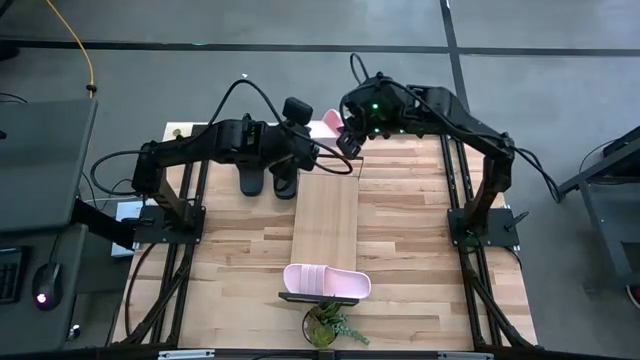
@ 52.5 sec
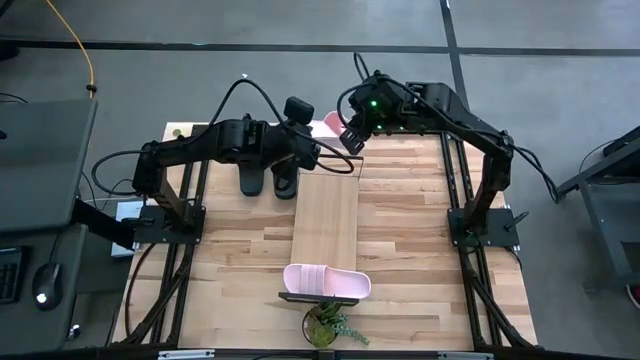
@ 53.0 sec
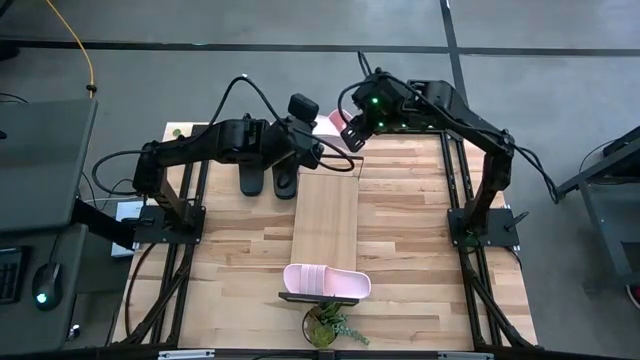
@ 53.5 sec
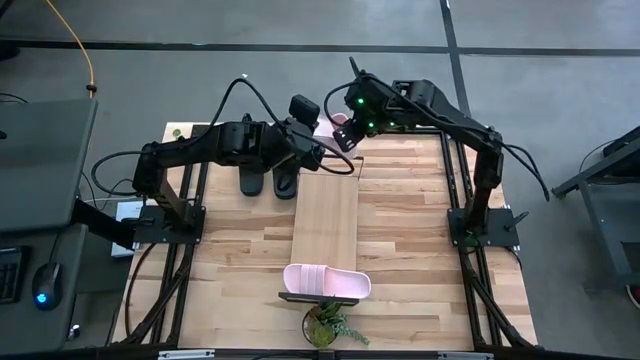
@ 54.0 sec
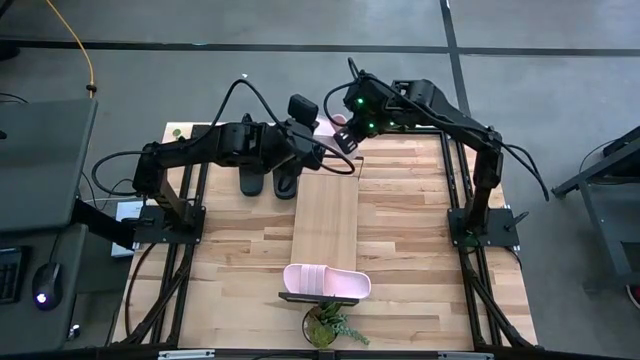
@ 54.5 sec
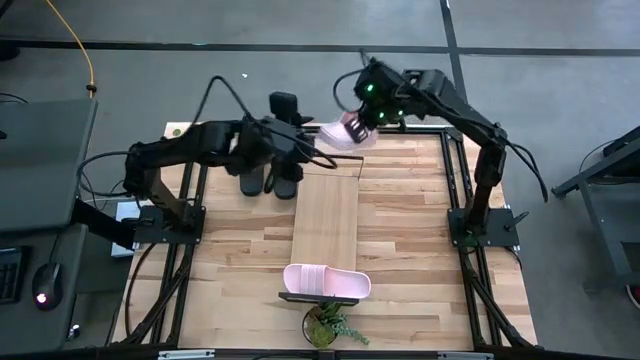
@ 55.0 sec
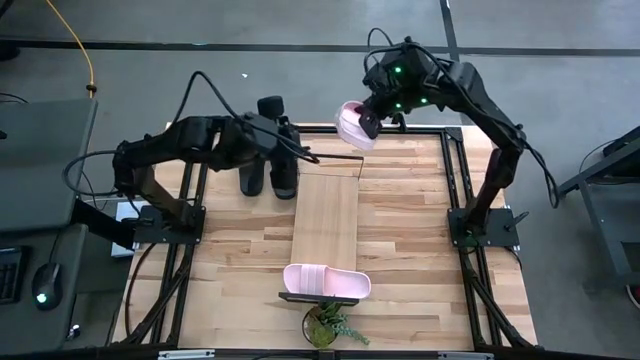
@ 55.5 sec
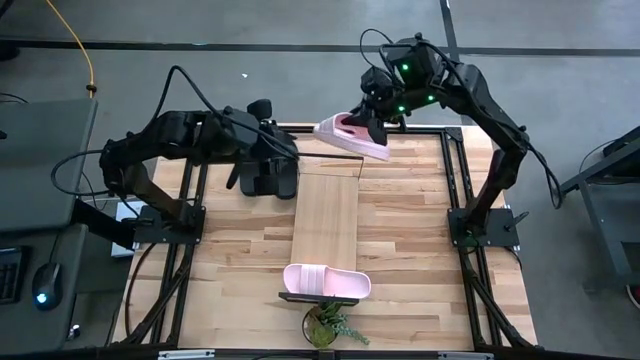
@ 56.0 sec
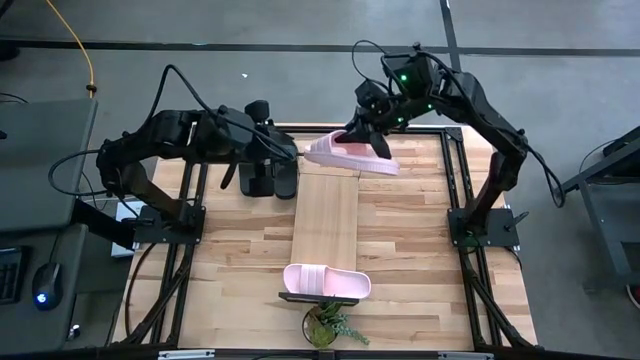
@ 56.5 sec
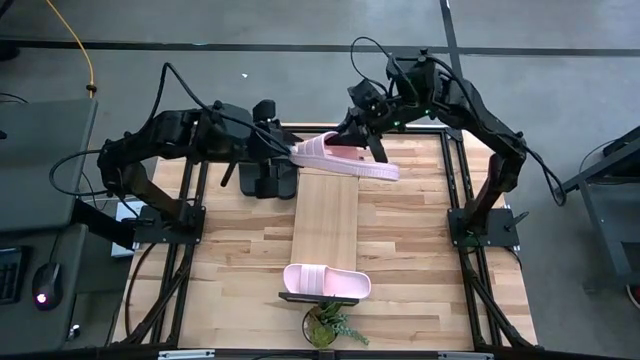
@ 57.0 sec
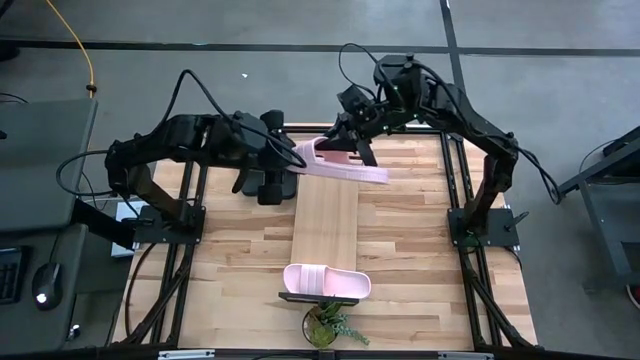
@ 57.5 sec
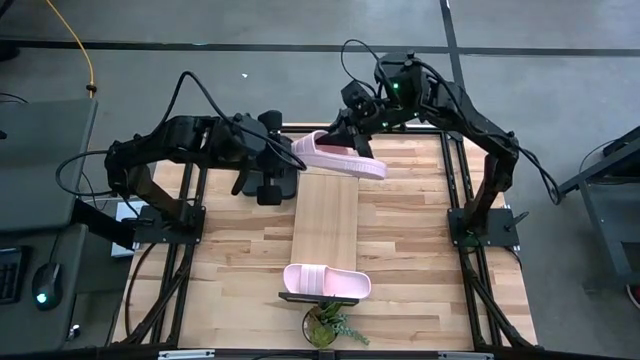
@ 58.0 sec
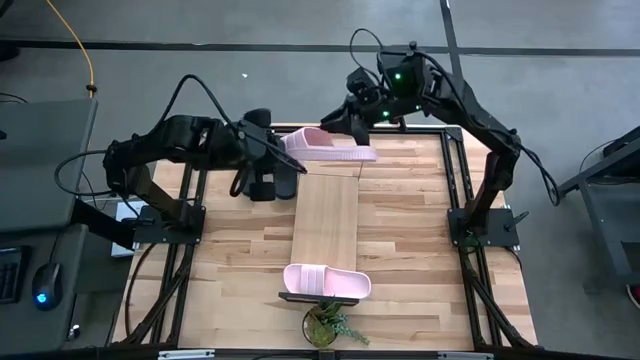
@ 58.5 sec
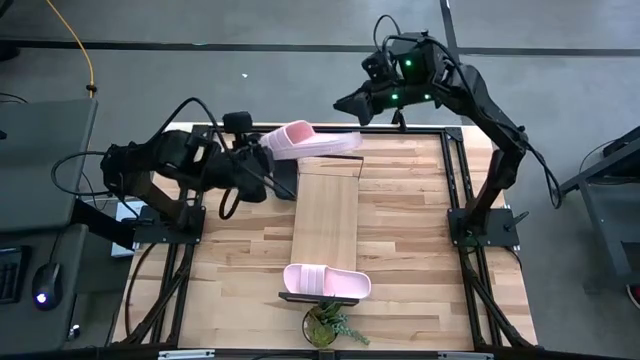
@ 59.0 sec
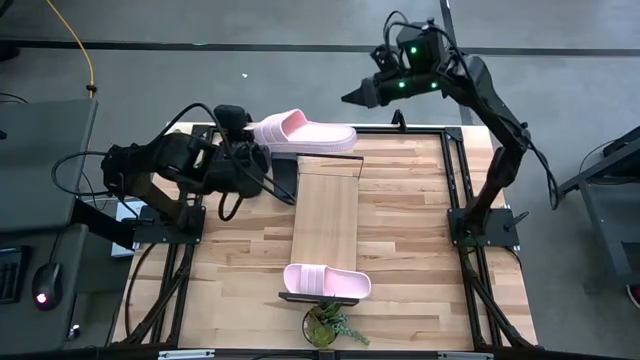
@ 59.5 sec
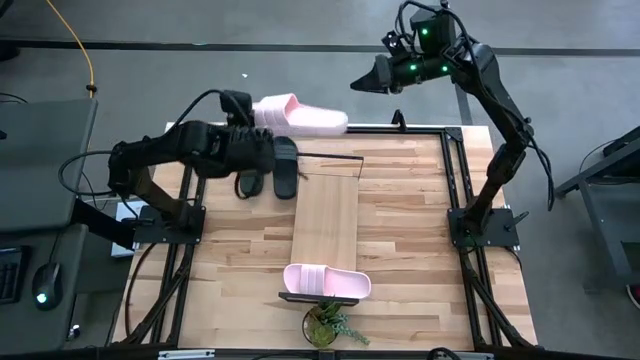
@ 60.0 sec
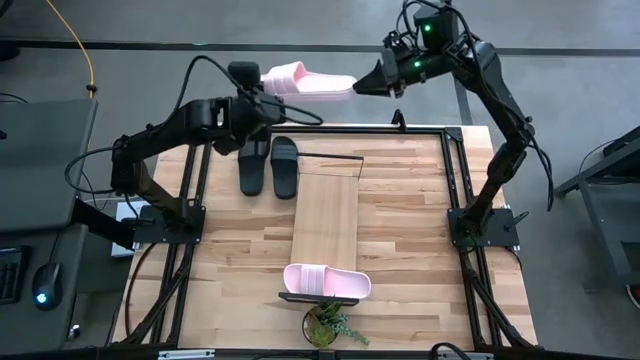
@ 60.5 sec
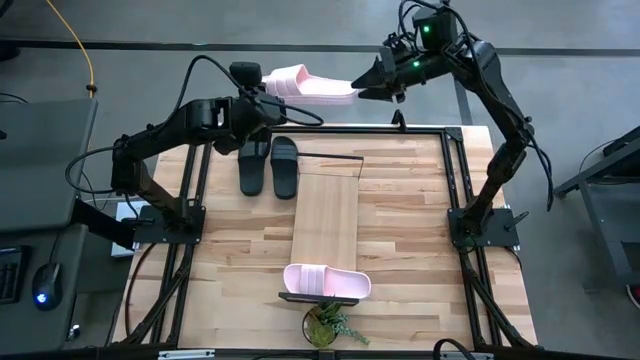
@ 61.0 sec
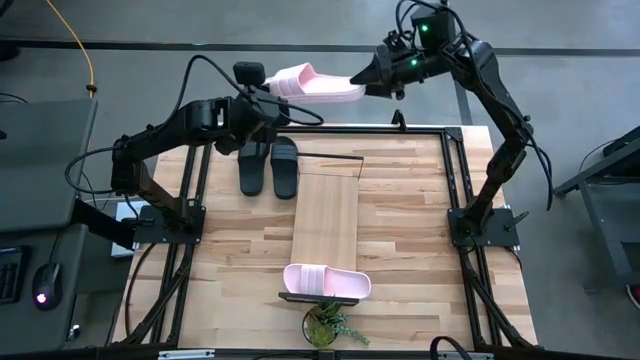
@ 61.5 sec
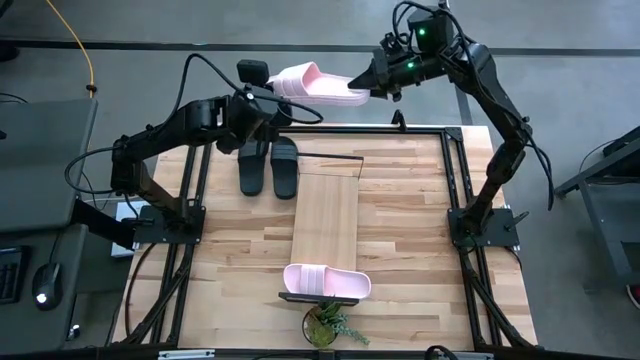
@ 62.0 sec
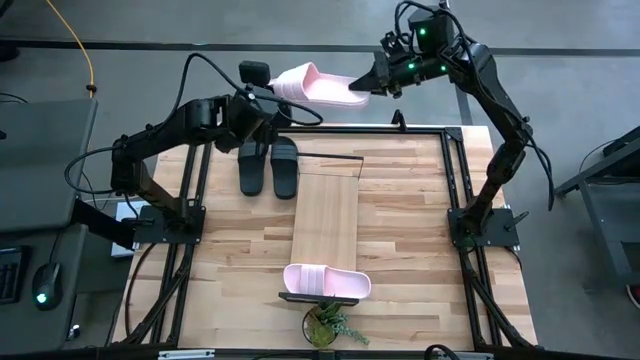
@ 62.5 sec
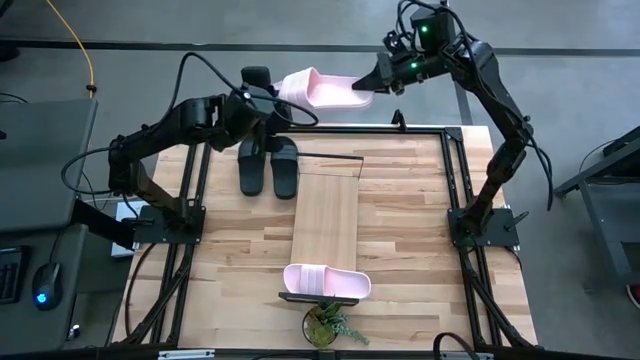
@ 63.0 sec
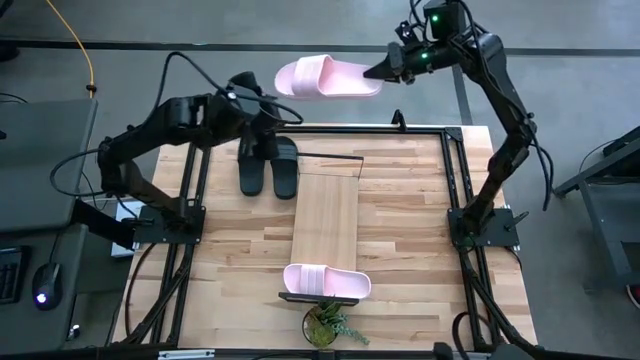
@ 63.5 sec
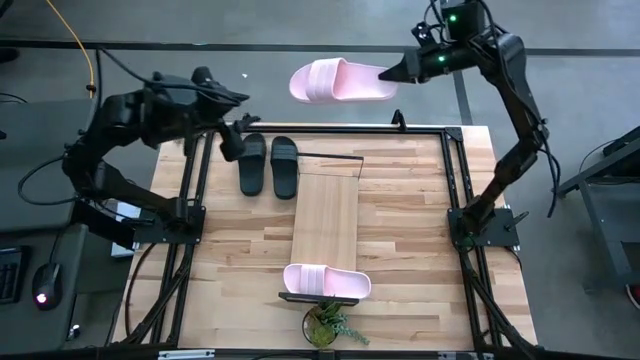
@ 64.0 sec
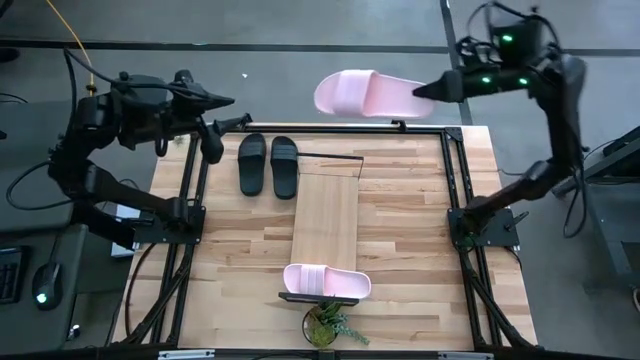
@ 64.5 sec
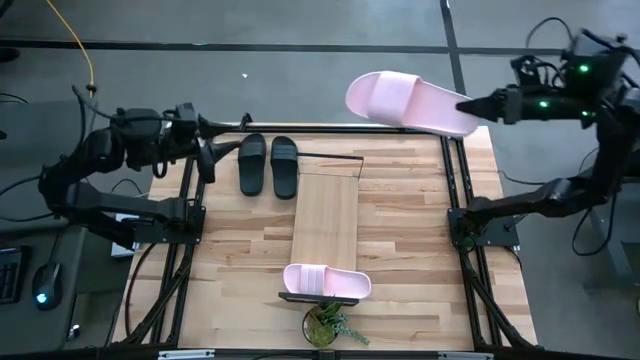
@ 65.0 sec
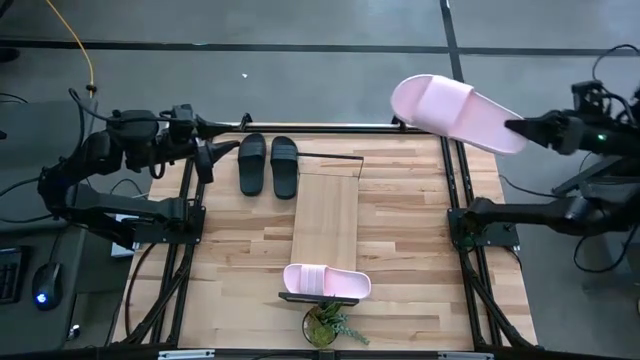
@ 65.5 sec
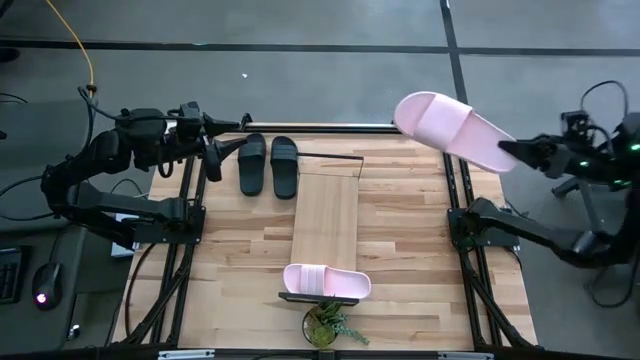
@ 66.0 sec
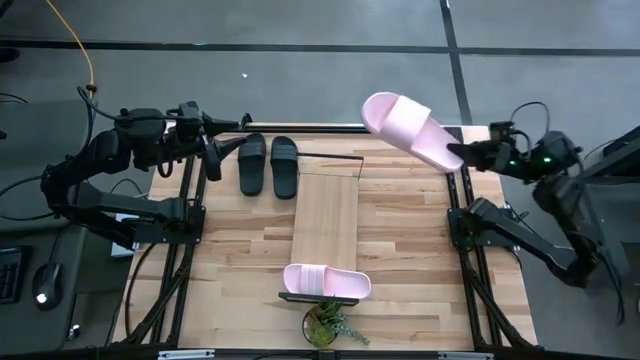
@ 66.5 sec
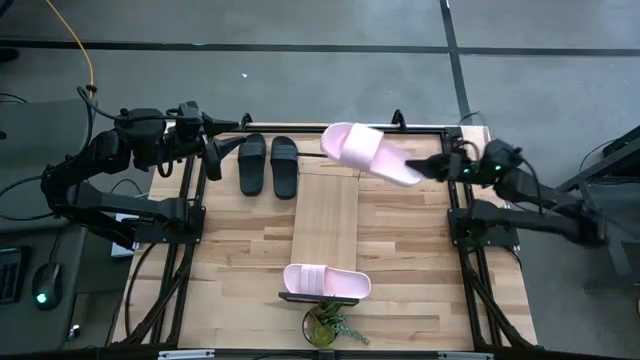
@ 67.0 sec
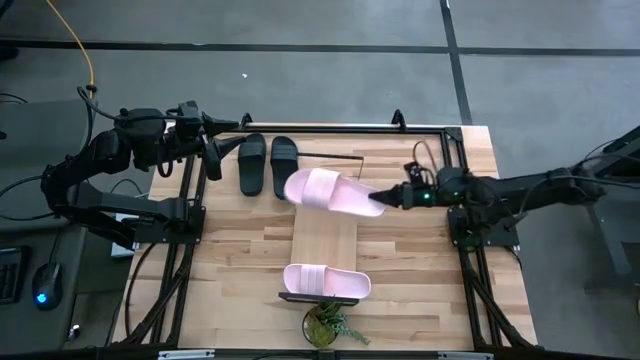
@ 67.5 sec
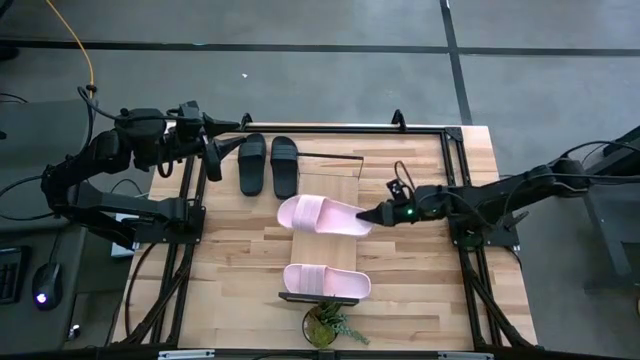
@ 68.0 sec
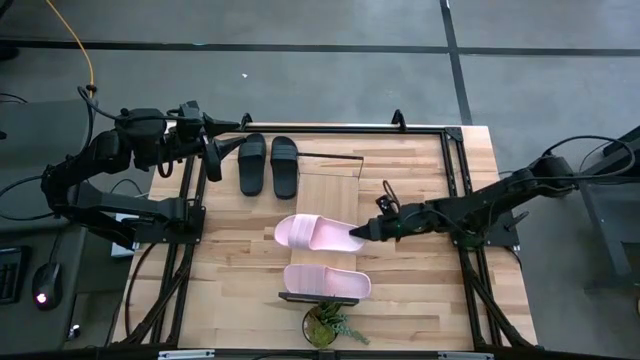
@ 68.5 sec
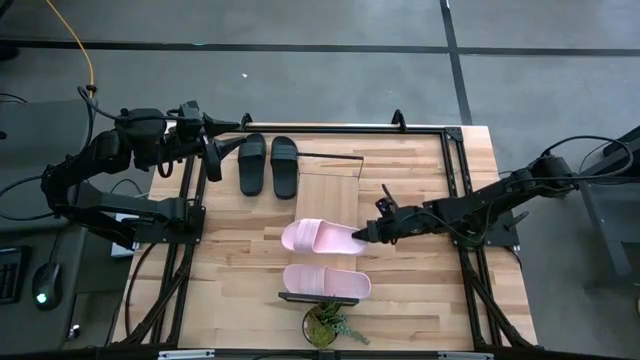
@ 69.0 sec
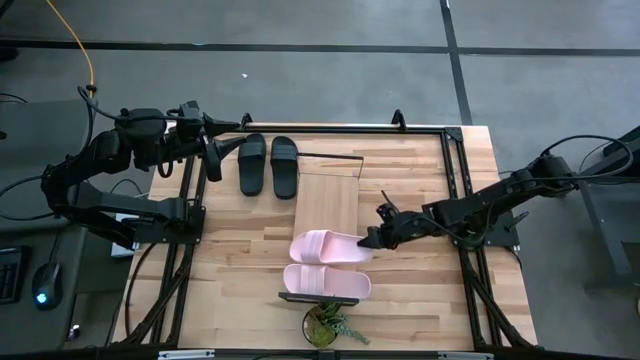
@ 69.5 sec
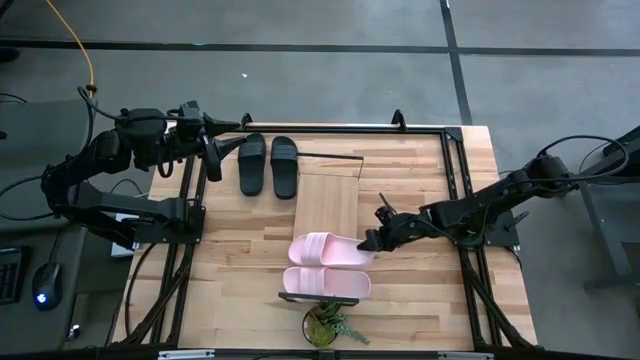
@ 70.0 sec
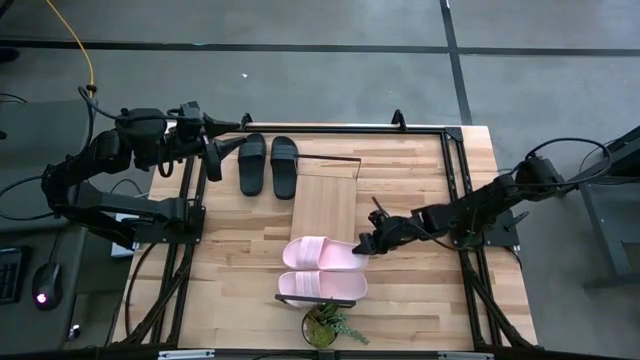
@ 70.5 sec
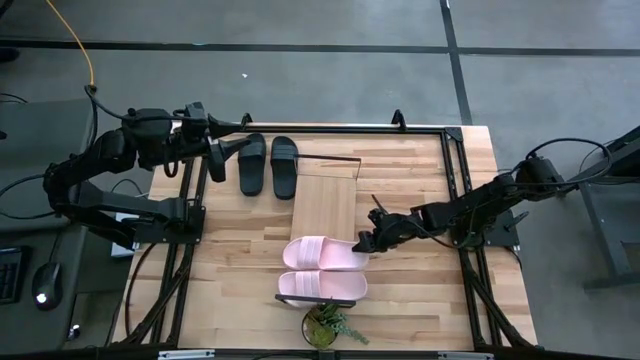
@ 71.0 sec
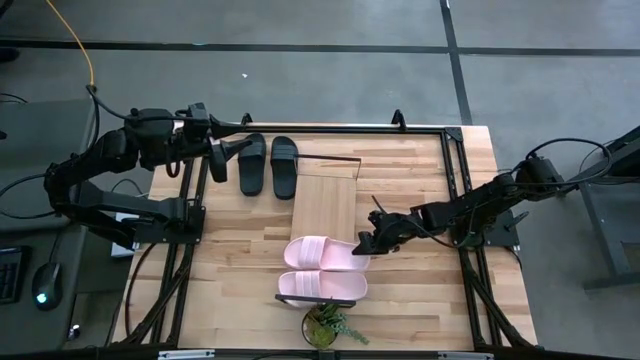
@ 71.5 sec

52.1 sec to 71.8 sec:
Task: Pick and place slides into the shelf
Put the pink slides on the shelf
